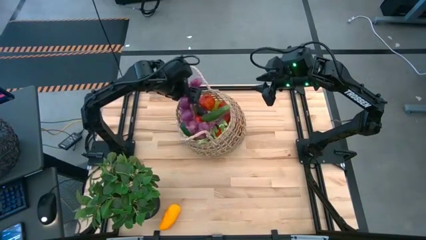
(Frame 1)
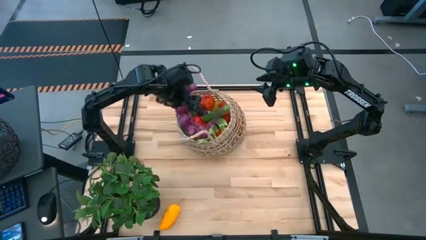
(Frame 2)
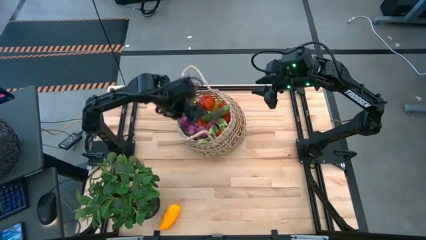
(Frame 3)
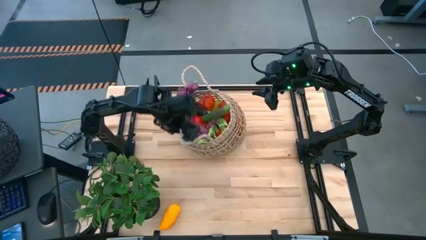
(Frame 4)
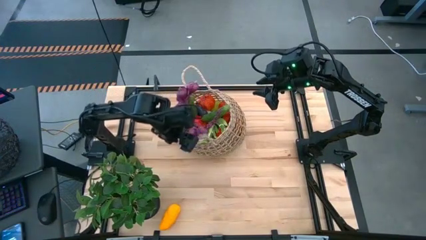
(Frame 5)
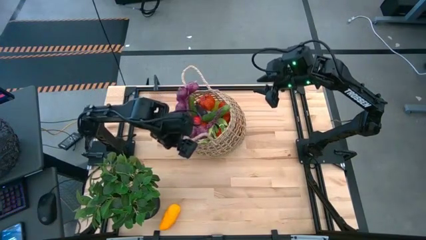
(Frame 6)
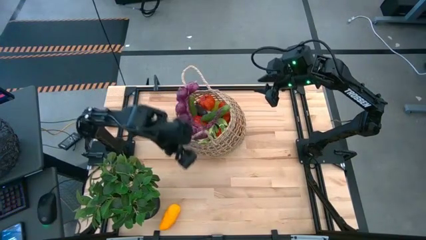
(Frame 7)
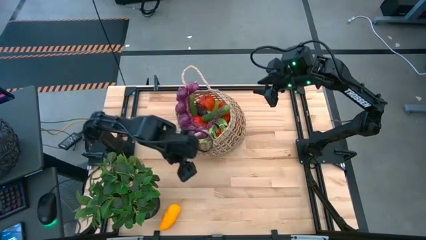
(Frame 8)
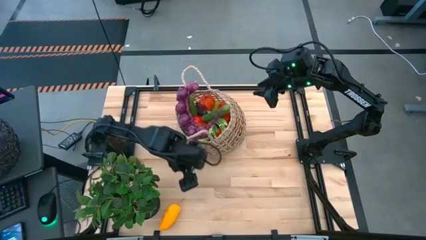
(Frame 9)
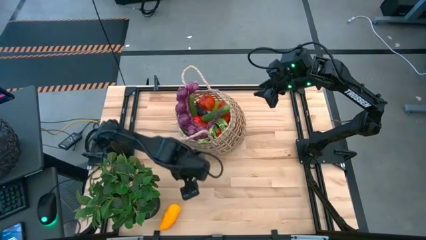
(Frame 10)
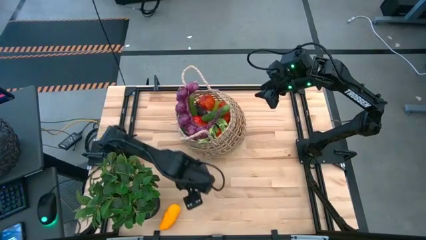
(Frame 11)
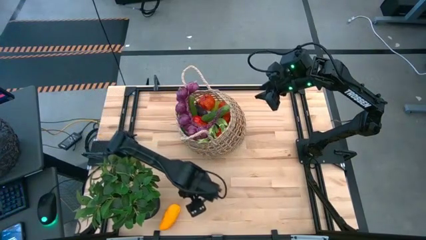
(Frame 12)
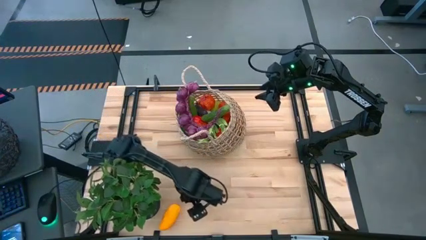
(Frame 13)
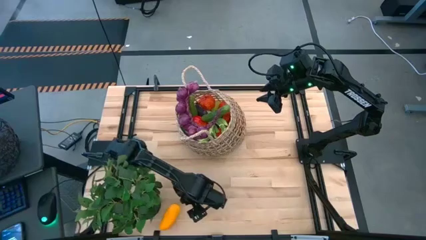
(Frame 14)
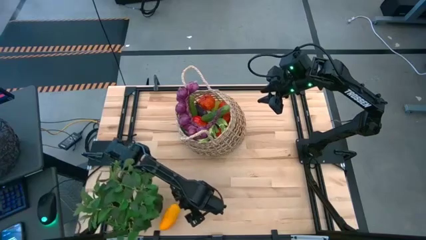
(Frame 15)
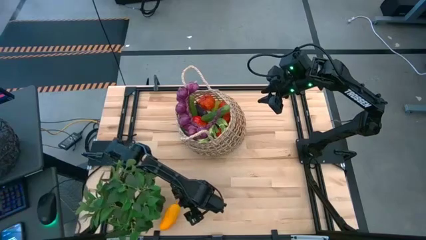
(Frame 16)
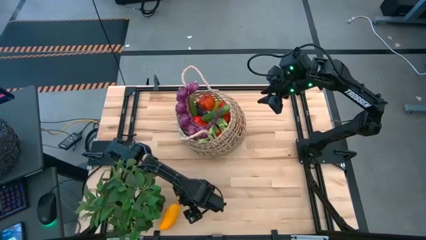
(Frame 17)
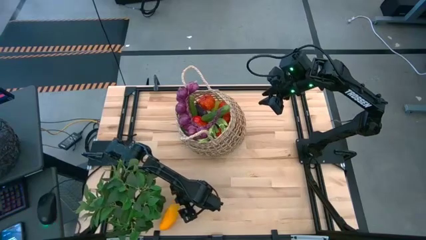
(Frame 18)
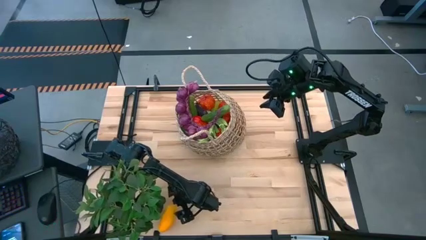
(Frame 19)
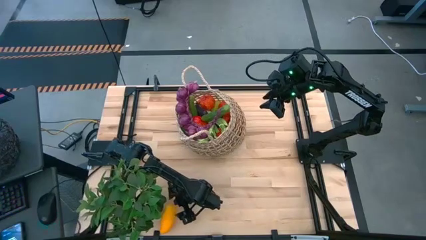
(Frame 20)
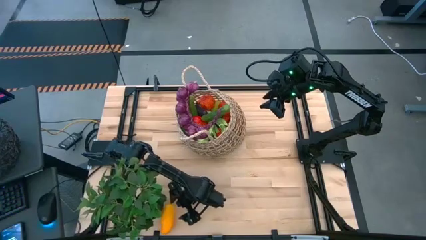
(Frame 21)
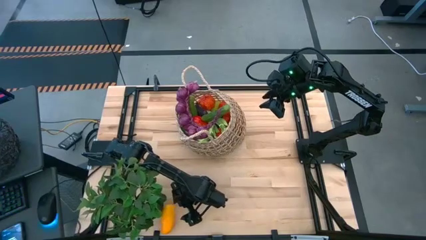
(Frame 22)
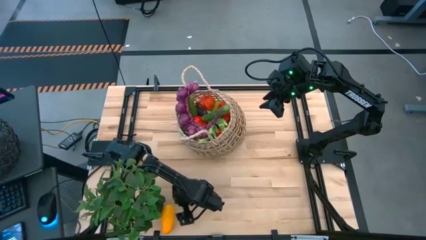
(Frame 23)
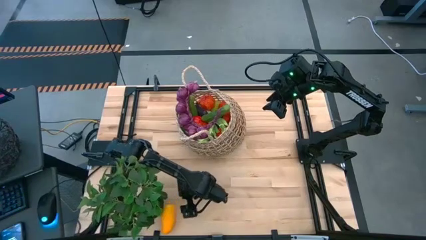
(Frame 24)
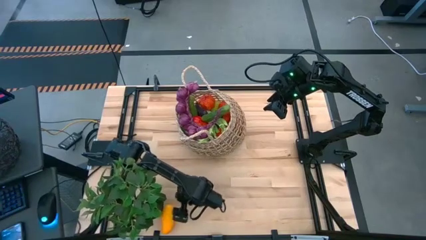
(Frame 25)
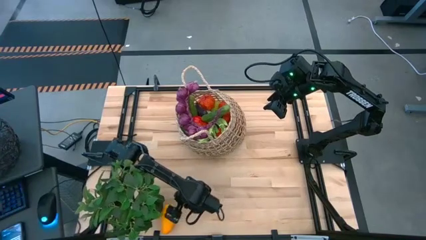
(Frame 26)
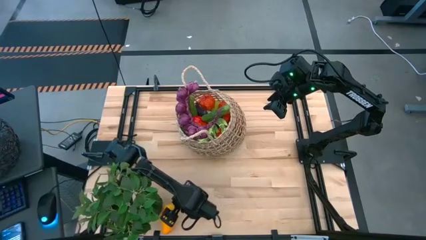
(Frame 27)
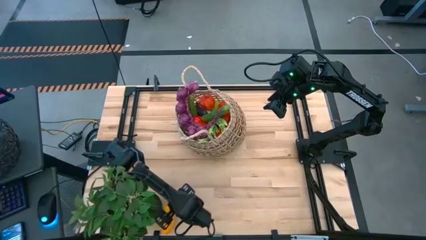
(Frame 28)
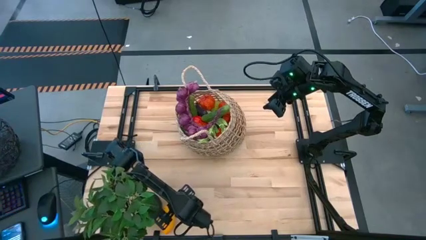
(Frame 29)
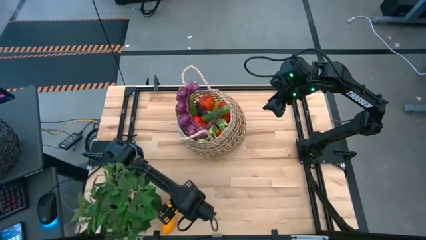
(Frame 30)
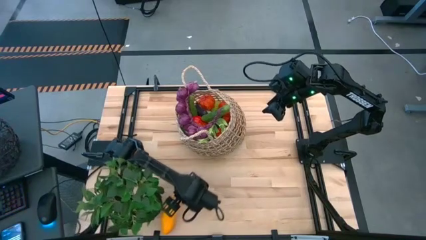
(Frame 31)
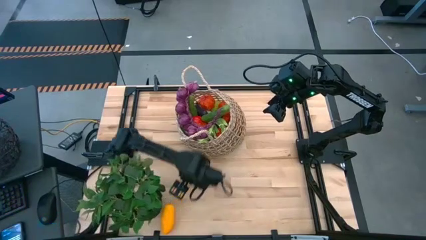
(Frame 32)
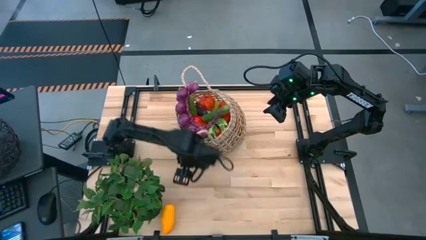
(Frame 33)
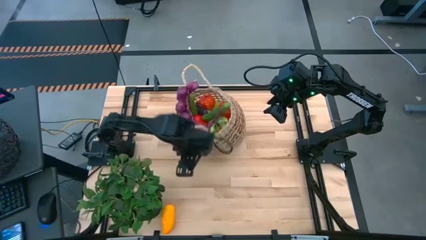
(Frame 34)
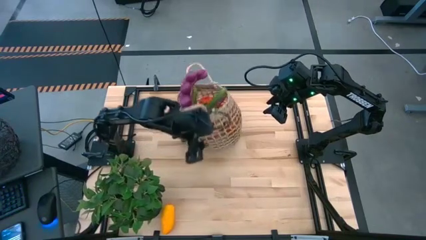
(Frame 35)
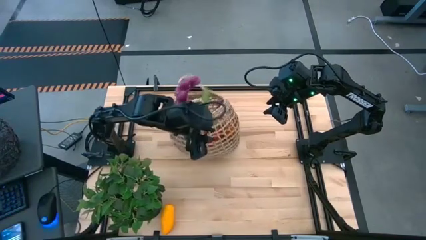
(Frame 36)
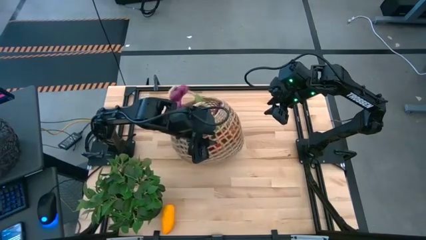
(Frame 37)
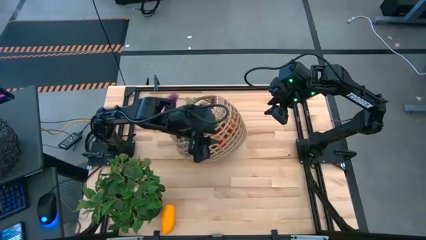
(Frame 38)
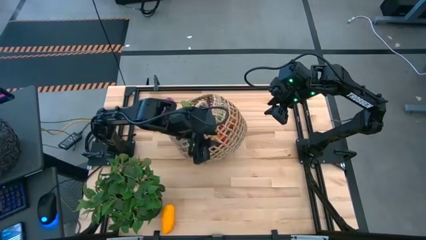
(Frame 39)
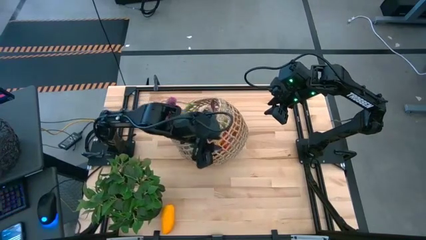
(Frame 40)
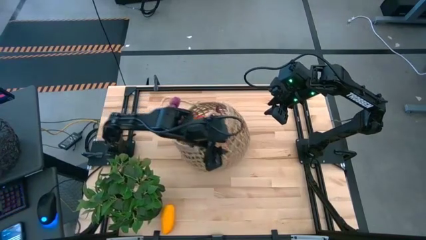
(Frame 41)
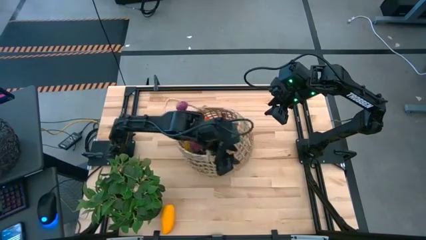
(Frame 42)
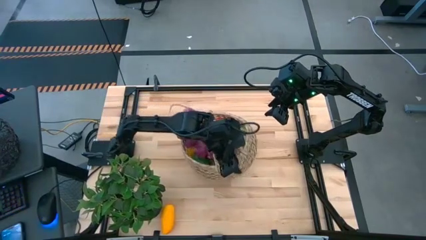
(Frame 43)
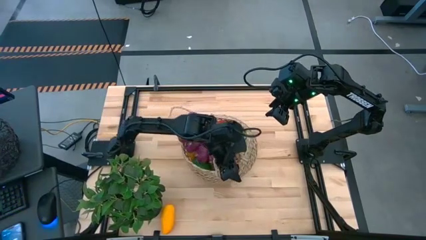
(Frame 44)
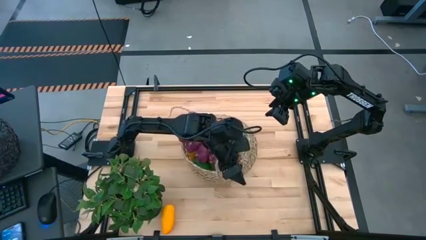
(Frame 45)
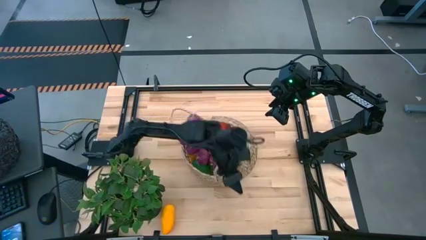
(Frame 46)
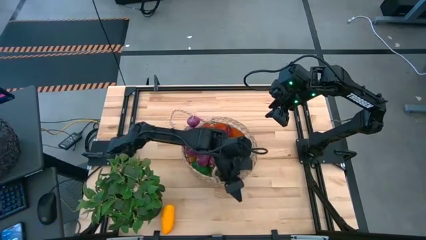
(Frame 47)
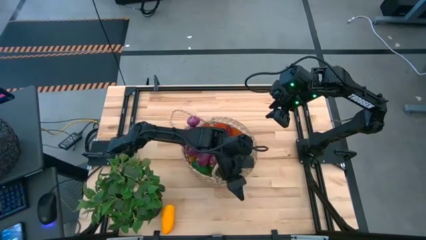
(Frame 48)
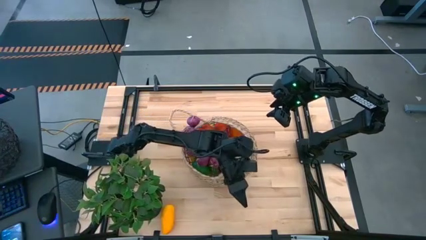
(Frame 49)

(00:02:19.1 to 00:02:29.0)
Task: Build produce basket
Put the yellow mango into the brown basket

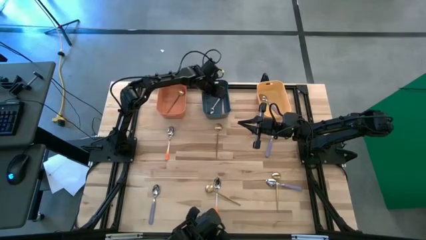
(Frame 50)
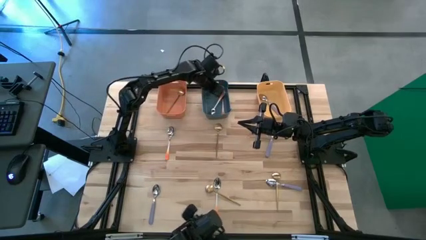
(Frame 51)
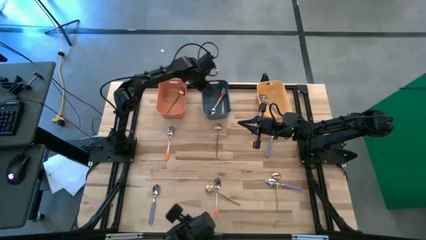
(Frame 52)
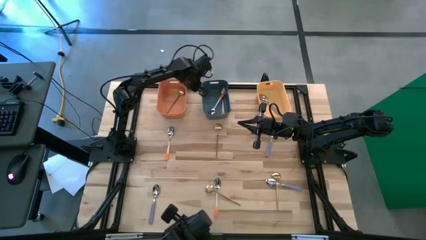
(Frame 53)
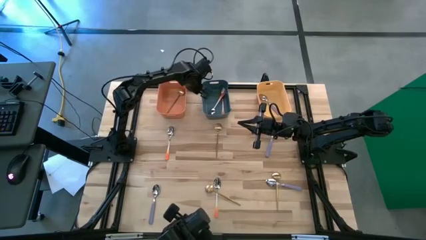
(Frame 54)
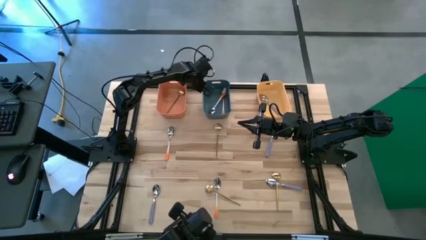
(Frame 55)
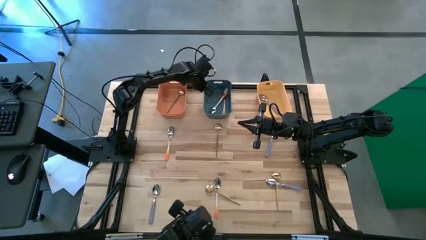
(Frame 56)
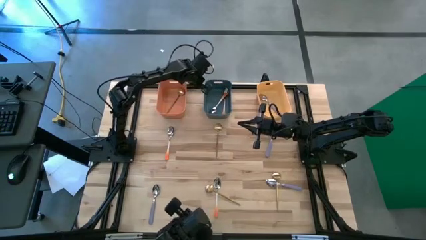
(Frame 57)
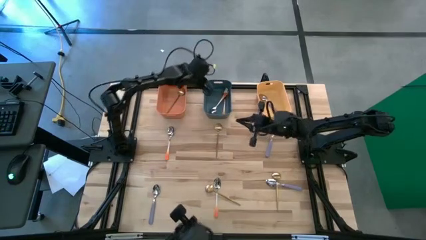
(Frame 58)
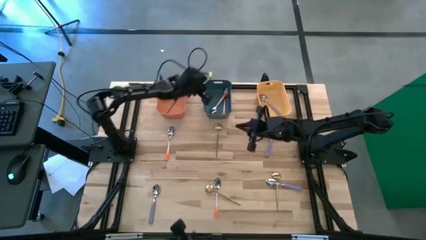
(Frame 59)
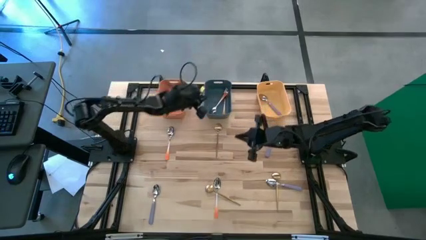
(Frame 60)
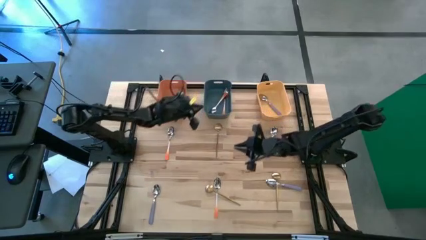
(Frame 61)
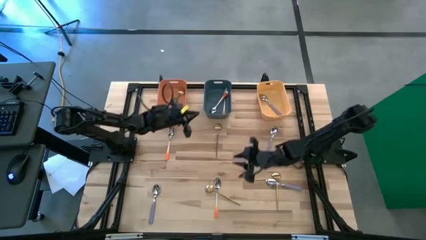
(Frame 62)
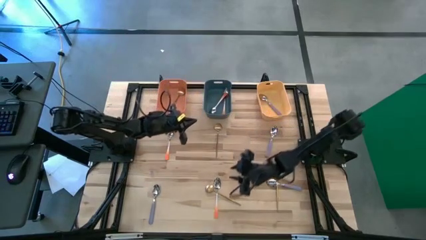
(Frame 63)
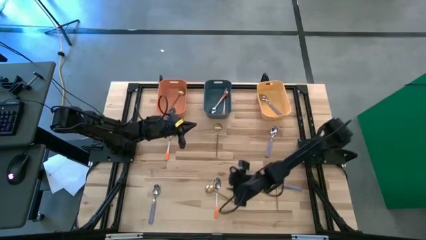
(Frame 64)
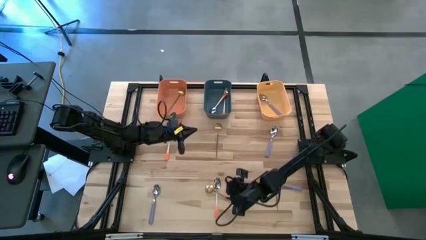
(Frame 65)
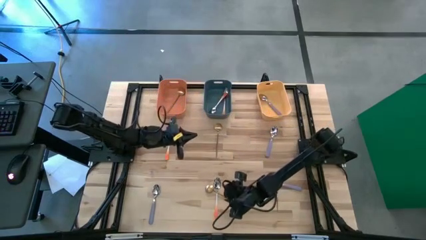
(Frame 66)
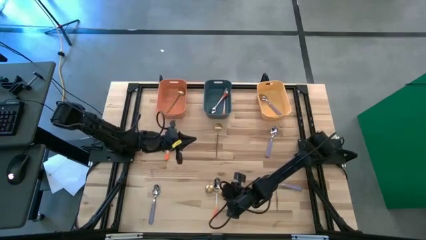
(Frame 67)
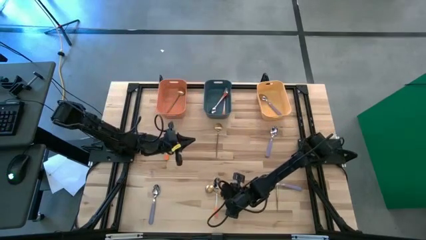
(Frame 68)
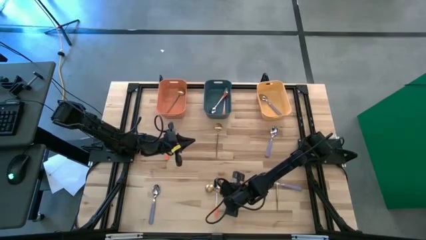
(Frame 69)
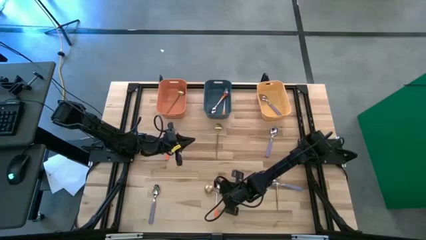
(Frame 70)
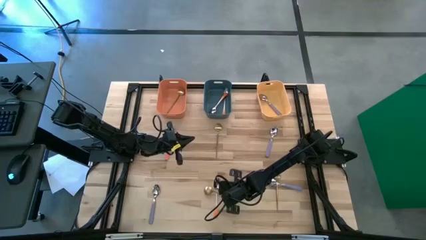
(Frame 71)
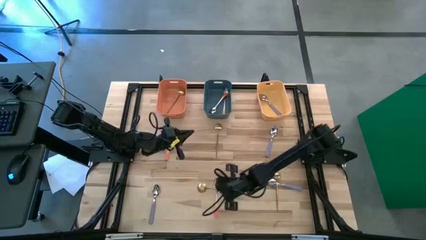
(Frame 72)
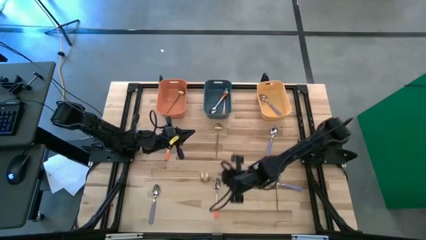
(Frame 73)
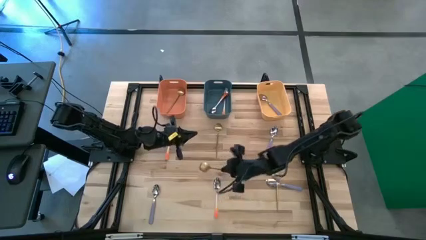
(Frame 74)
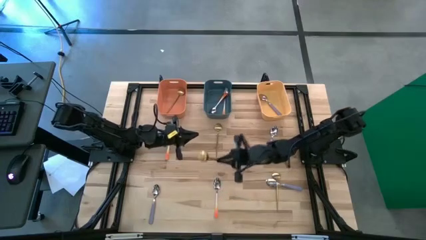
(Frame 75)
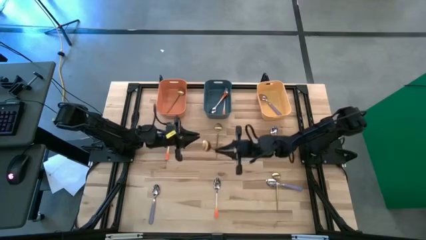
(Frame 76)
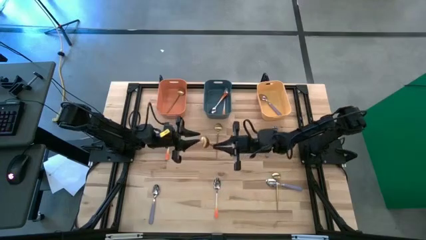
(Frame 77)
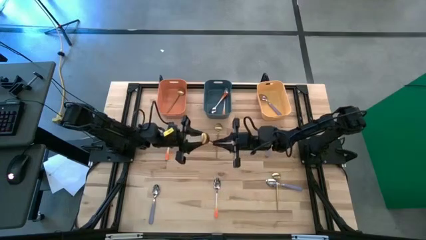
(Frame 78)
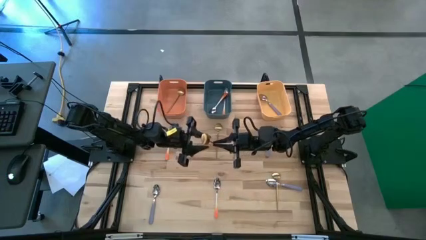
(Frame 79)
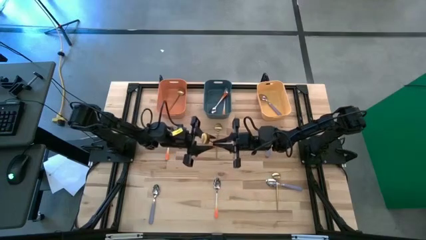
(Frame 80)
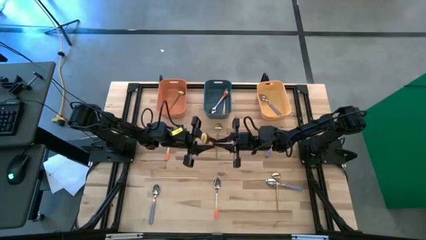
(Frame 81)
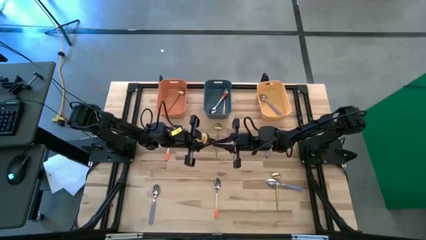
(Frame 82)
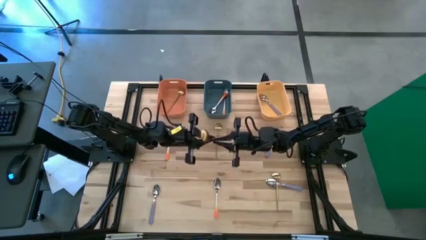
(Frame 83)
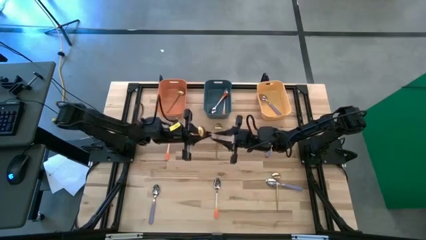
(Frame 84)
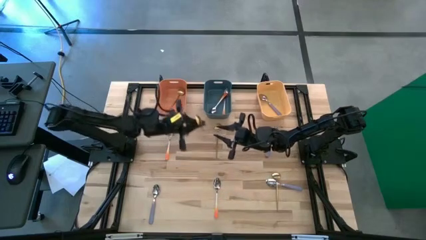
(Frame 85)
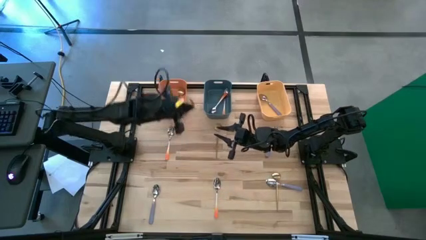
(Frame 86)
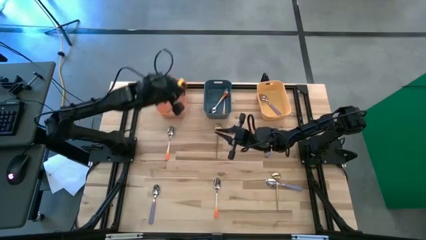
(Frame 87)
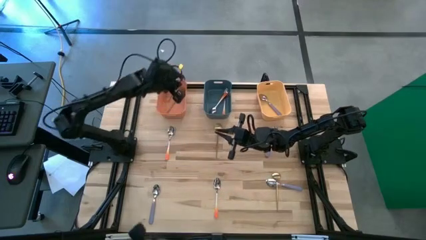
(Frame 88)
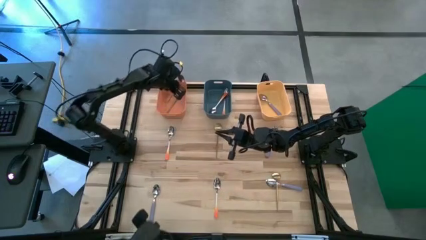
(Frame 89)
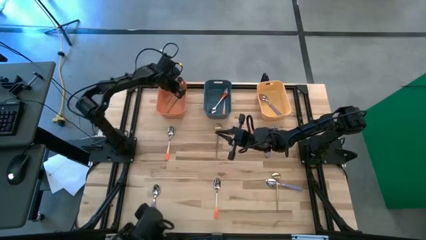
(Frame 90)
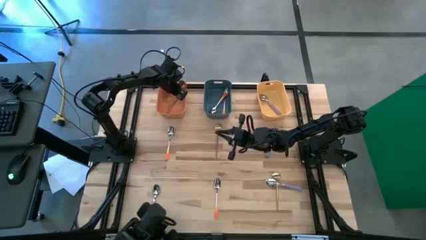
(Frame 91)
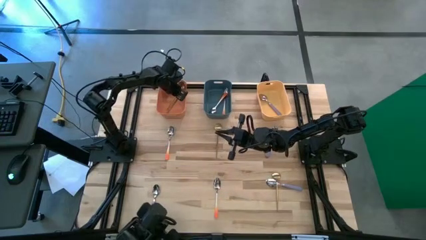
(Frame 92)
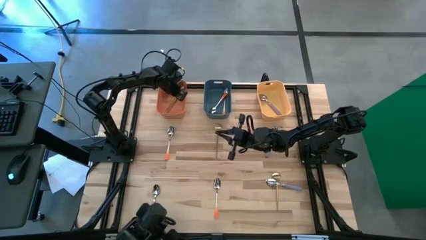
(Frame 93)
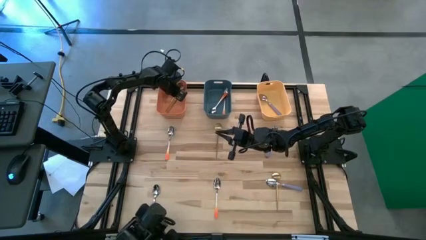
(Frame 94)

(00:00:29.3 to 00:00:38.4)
Task: Sort silverware by color (type)
Put the gold spoon into the orange bin
